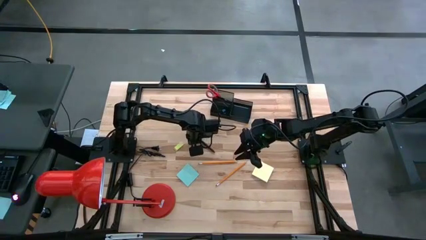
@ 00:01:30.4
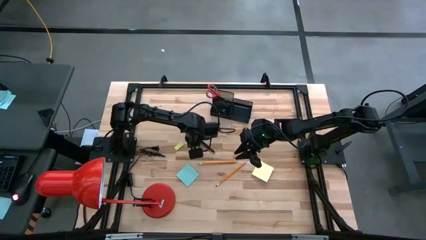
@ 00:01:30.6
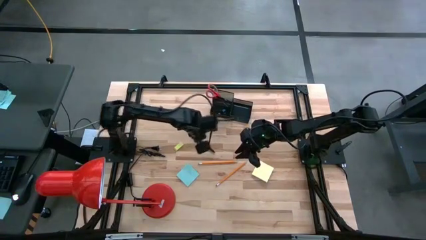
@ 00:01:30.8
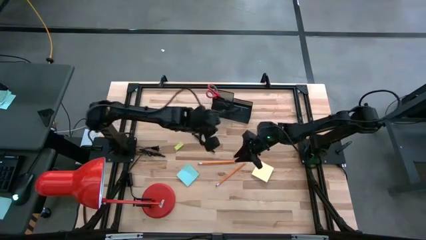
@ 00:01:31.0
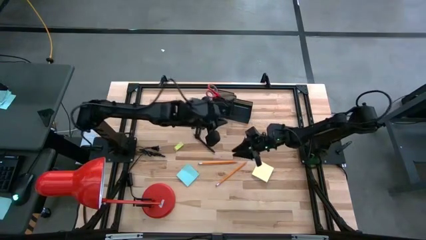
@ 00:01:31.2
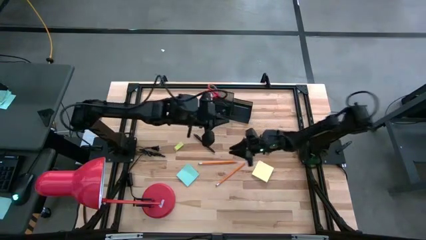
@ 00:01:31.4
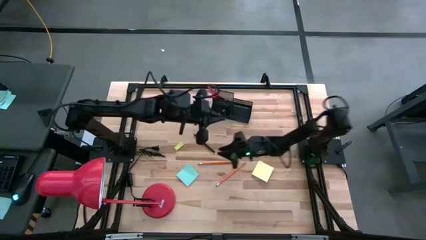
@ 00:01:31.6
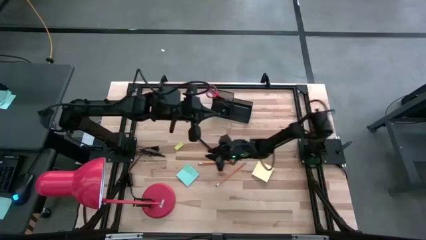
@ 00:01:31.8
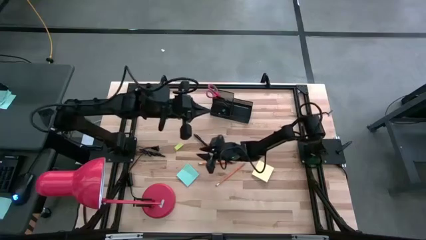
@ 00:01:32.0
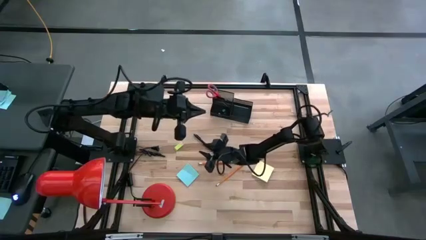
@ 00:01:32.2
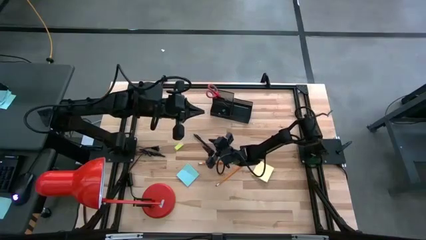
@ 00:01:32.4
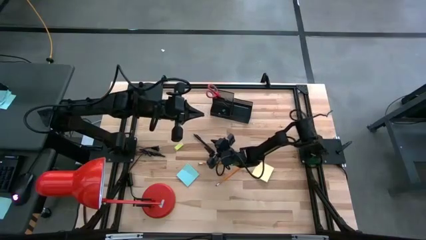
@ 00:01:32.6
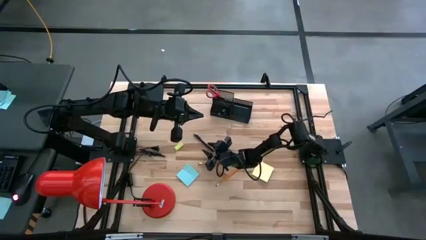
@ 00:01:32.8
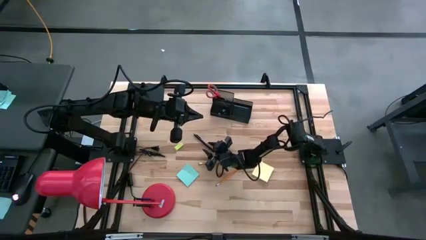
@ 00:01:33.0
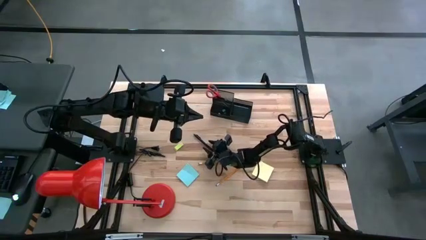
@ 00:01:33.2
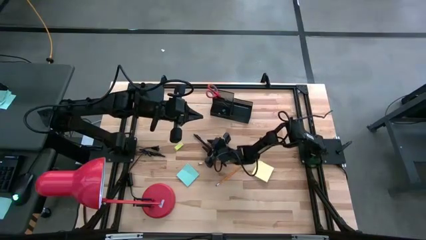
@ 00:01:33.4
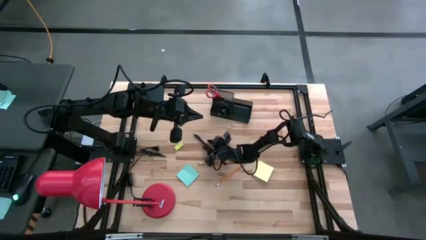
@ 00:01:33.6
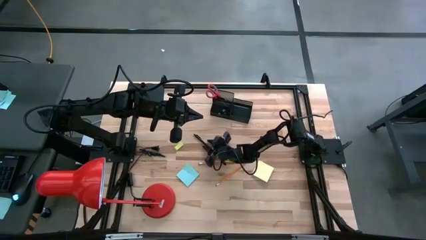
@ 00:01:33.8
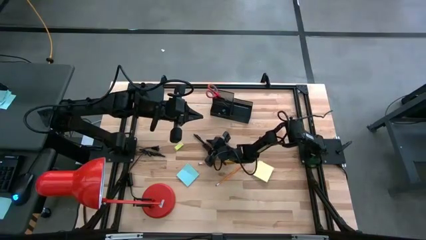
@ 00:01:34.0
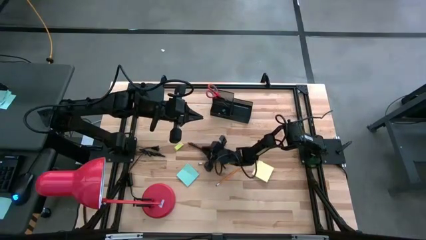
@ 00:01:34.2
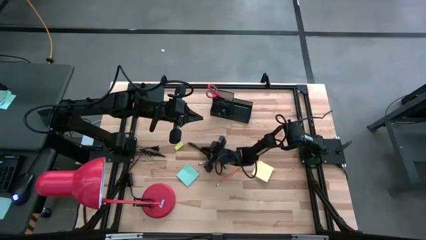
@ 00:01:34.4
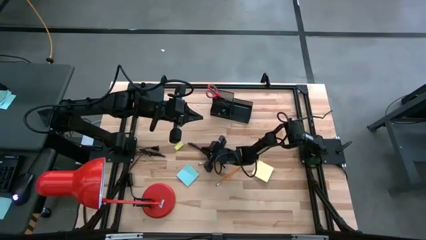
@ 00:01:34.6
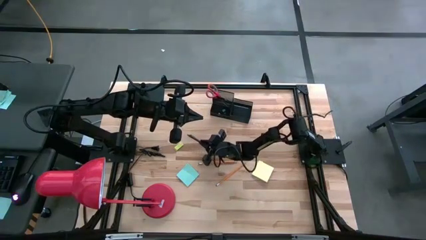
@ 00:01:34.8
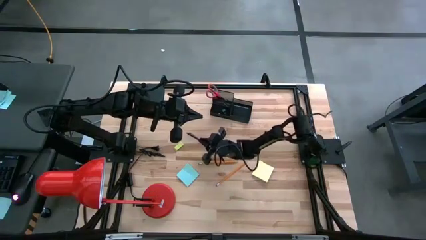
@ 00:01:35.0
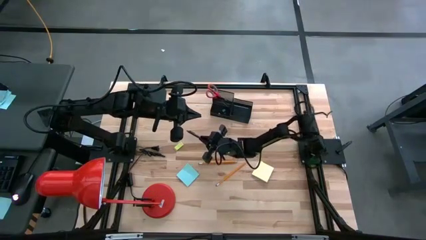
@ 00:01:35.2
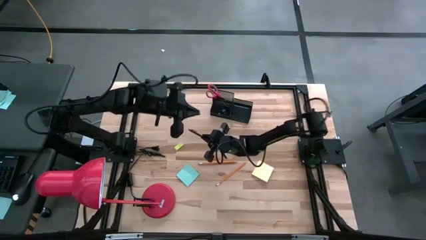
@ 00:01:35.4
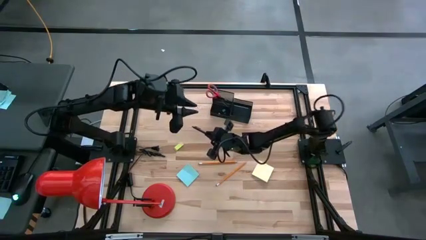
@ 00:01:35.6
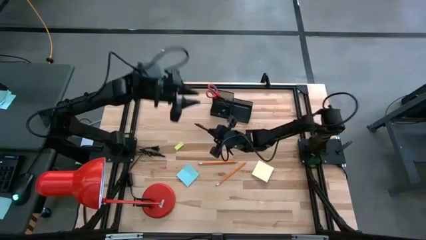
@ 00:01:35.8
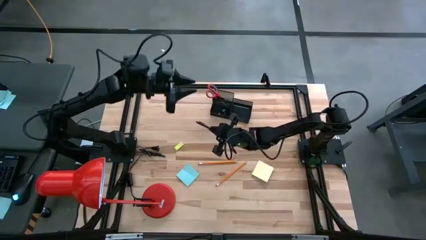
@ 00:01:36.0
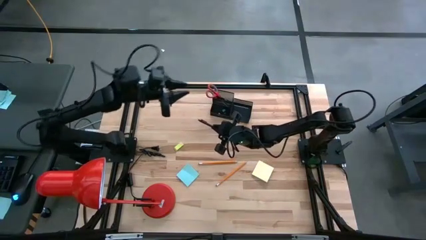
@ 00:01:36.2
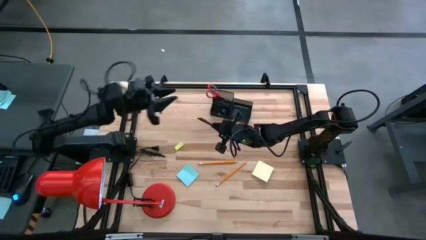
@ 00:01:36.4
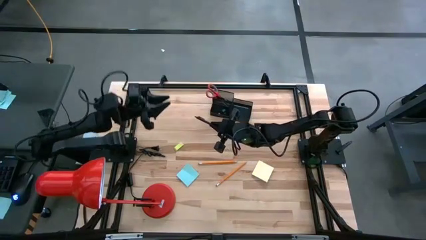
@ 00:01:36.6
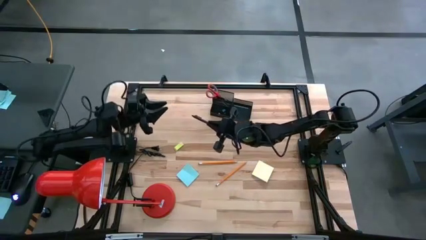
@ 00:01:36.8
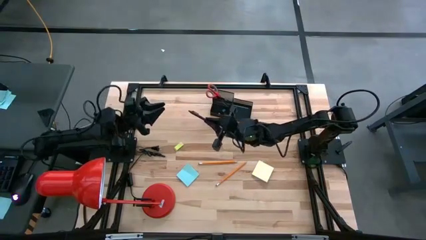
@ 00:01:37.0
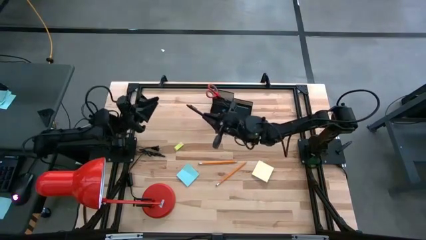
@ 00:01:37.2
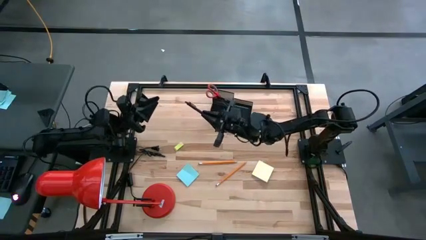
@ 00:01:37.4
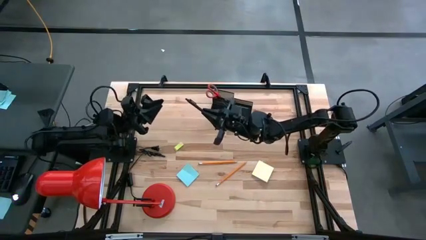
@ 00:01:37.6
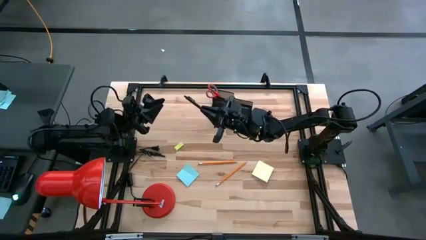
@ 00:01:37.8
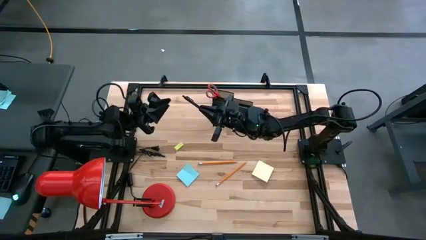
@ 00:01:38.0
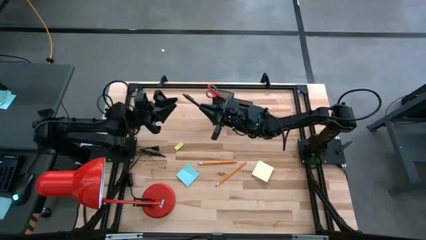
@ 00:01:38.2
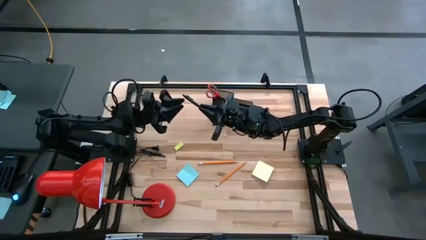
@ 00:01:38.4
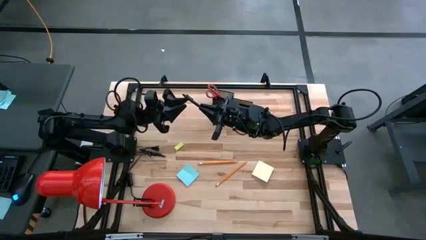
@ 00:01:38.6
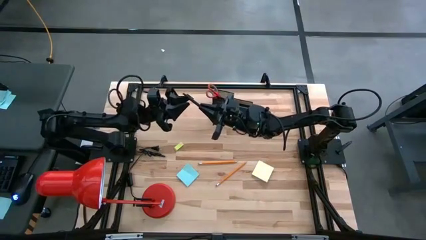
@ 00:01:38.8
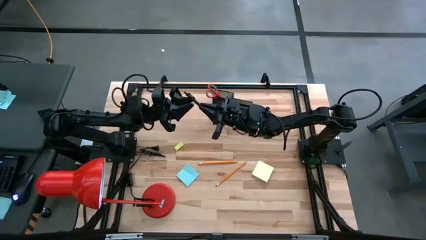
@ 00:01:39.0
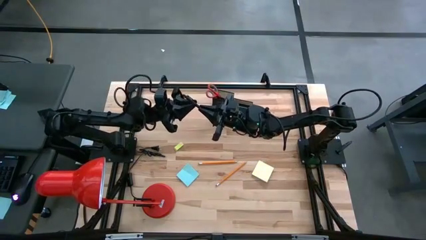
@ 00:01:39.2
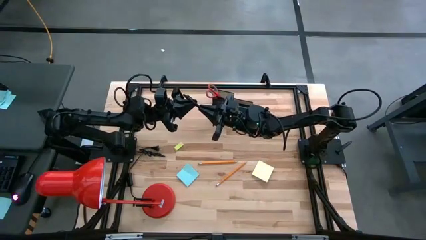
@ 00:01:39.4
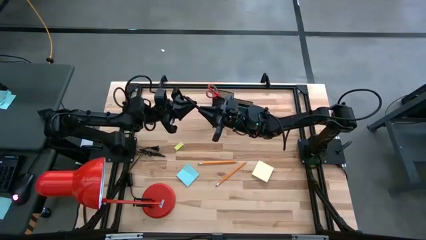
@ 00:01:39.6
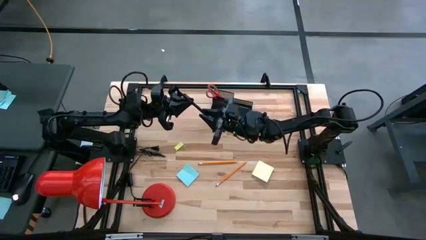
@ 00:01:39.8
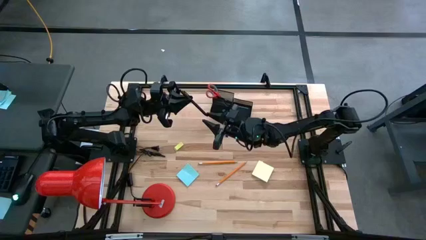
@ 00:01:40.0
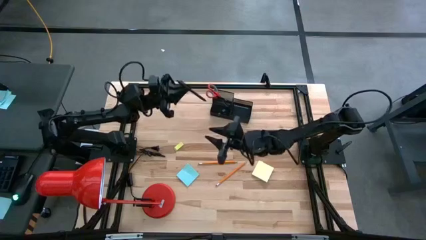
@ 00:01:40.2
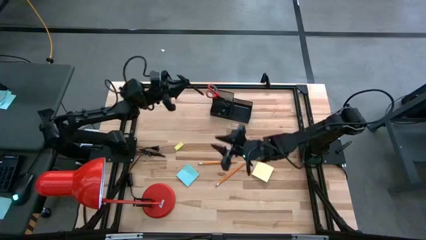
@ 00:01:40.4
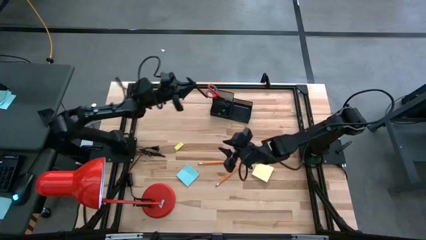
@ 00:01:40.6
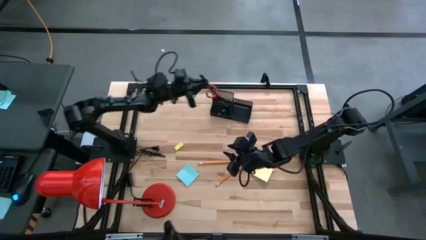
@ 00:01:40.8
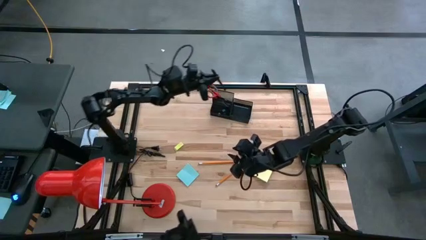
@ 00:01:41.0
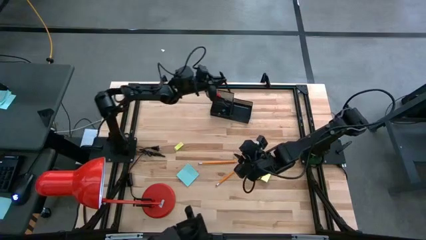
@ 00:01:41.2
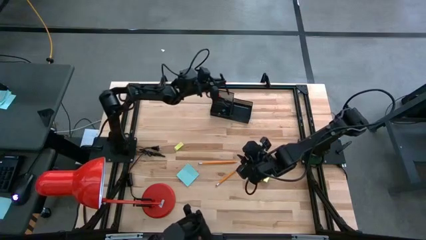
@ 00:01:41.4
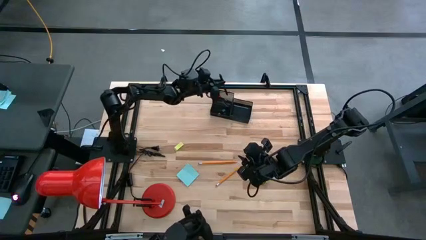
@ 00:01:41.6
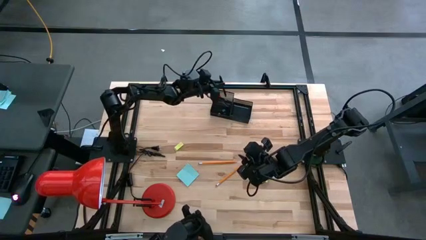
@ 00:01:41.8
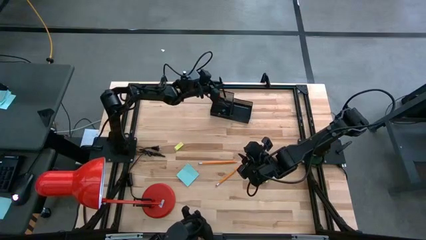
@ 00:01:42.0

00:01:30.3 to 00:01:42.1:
Task: Pick and place office supplies into organizer
Put the black pen in the black desk organizer

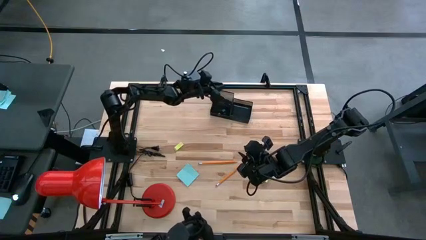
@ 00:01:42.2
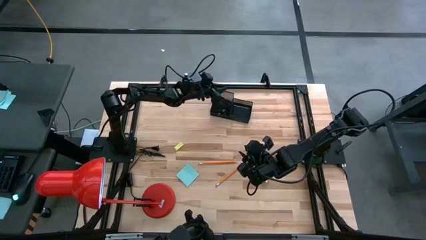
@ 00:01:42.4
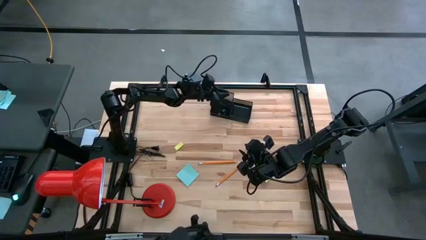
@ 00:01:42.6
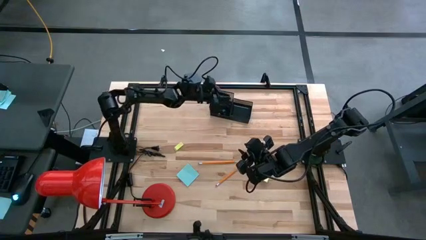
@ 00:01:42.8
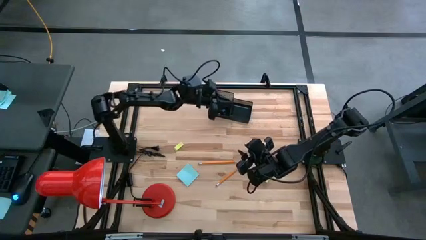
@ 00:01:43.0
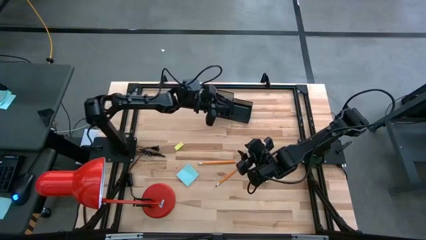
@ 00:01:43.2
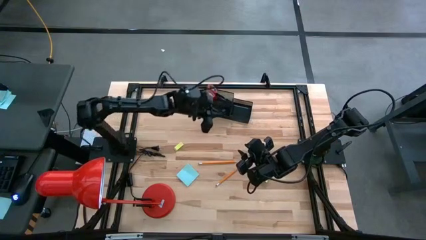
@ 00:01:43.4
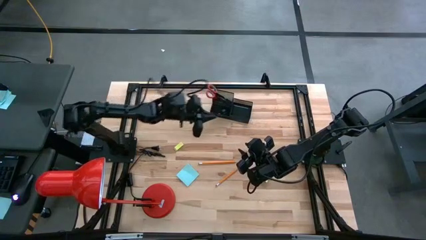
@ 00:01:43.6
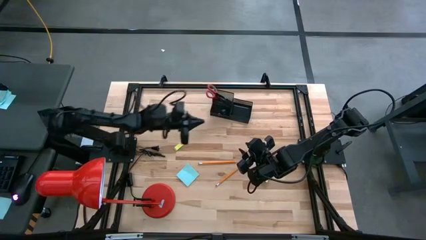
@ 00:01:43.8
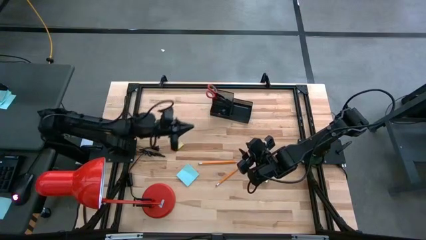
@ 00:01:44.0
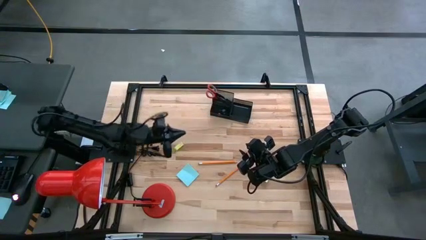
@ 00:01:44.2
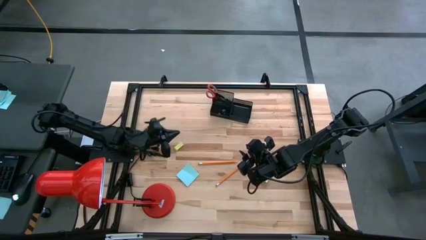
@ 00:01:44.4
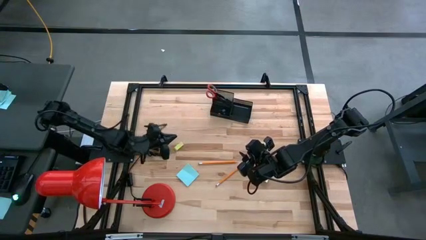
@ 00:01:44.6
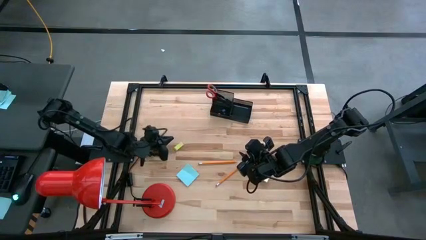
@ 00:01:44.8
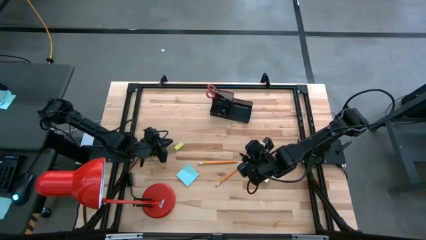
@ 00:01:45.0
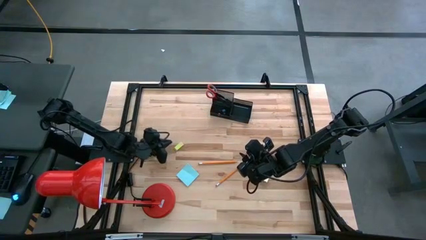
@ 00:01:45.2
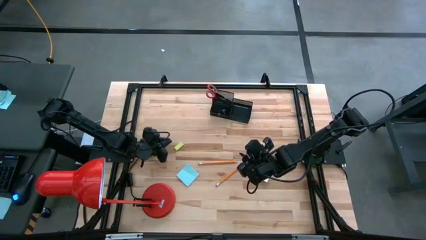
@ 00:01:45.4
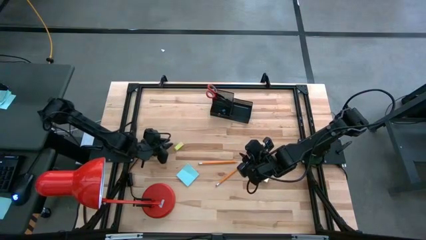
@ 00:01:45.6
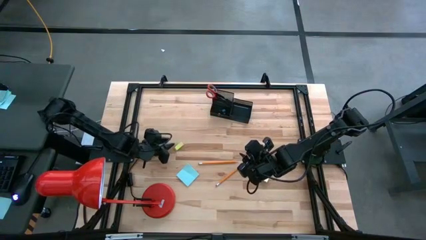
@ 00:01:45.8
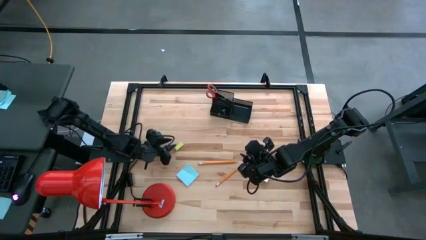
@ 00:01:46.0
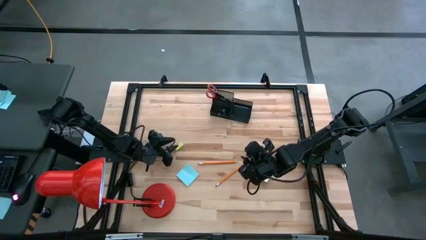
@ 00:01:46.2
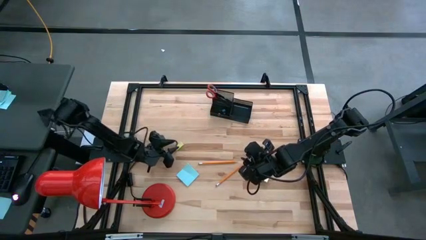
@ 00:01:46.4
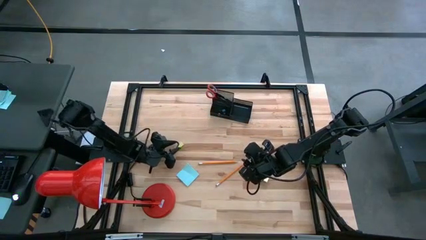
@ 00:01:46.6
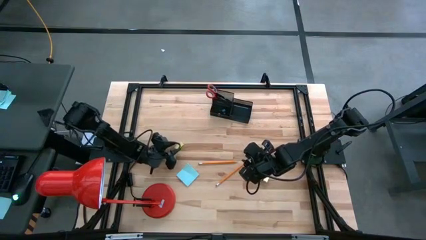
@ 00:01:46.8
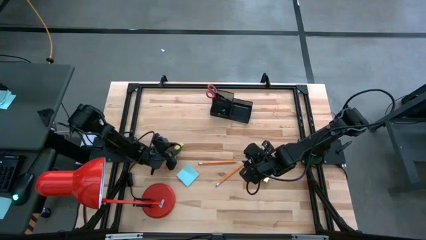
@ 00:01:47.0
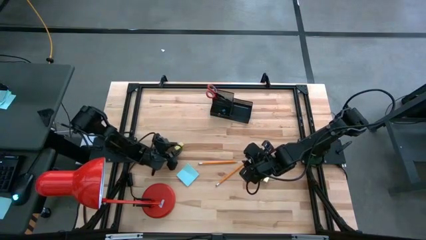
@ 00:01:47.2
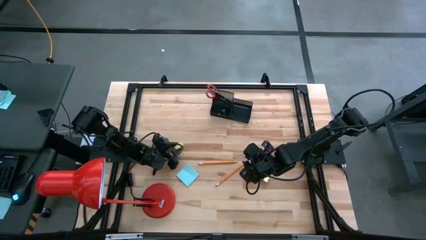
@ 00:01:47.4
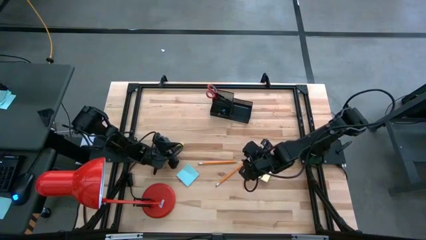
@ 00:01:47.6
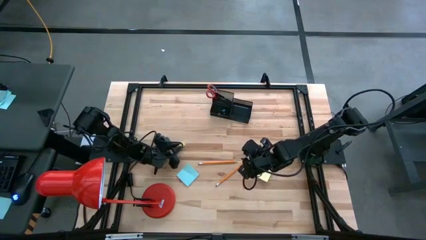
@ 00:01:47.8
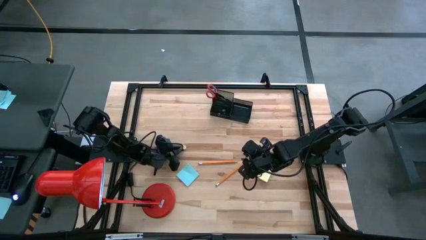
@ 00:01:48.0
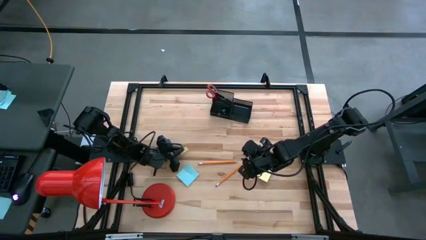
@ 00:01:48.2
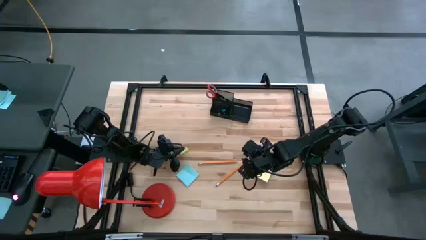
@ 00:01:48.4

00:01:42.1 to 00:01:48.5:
Put the green eraser in the black desk organizer
